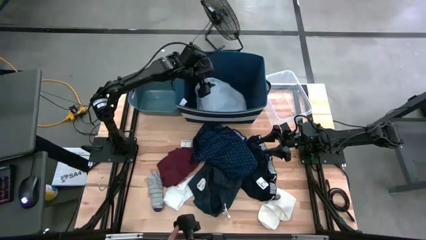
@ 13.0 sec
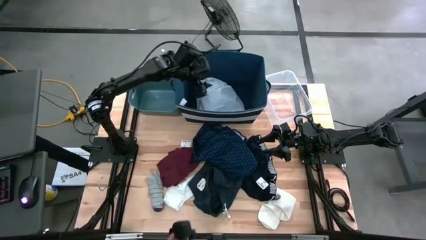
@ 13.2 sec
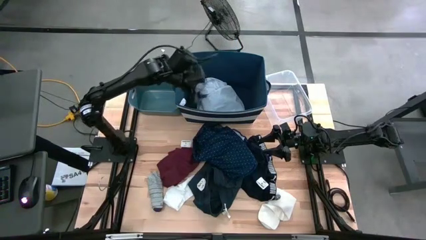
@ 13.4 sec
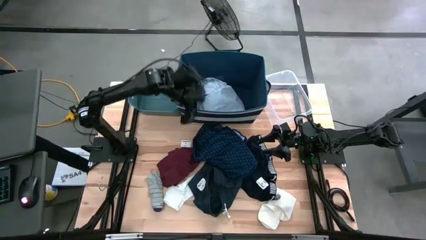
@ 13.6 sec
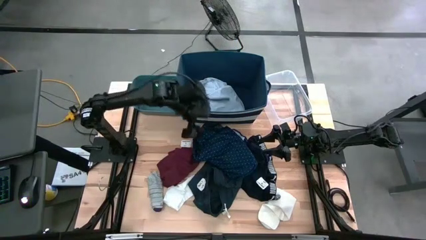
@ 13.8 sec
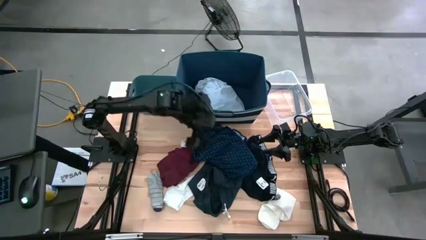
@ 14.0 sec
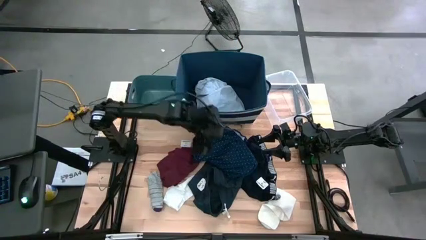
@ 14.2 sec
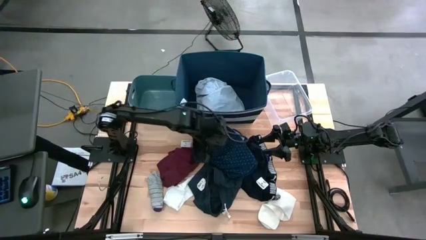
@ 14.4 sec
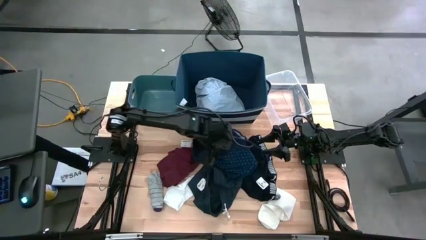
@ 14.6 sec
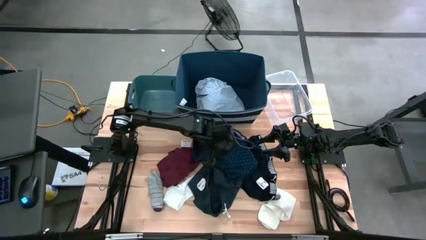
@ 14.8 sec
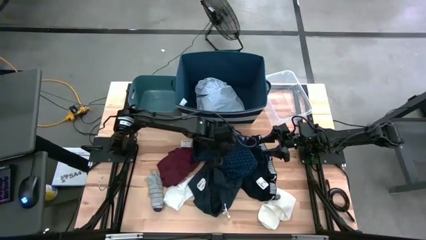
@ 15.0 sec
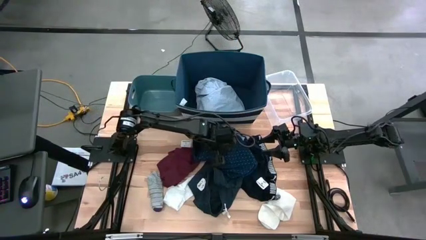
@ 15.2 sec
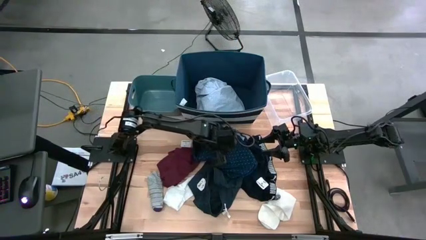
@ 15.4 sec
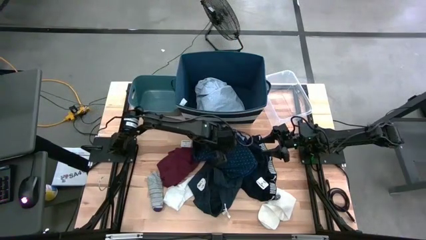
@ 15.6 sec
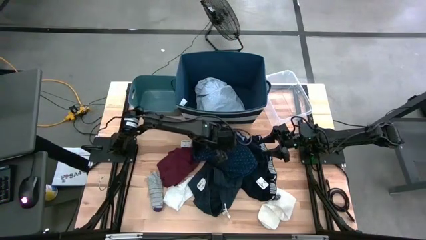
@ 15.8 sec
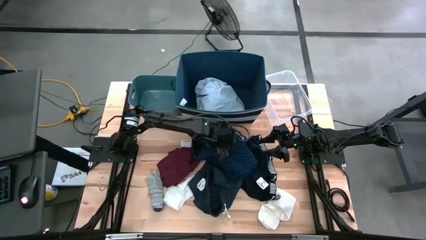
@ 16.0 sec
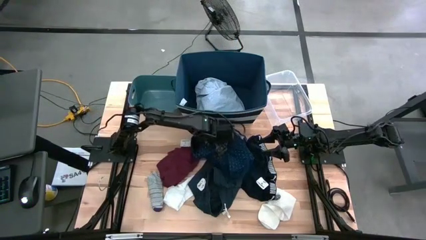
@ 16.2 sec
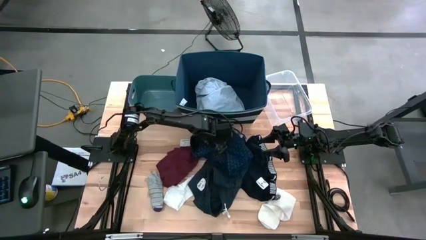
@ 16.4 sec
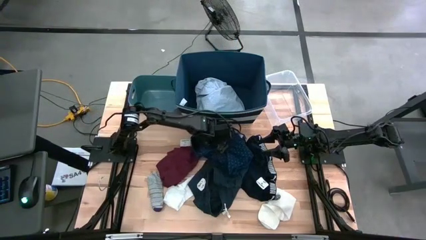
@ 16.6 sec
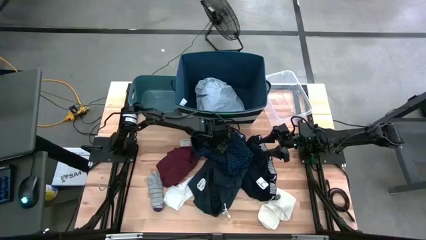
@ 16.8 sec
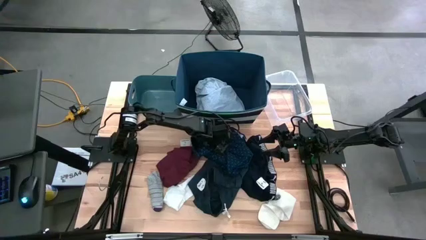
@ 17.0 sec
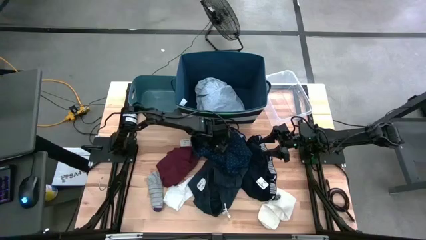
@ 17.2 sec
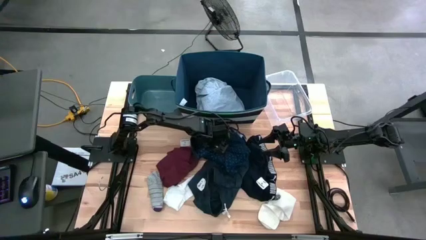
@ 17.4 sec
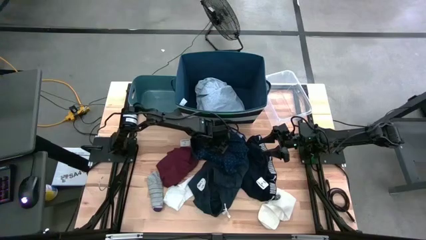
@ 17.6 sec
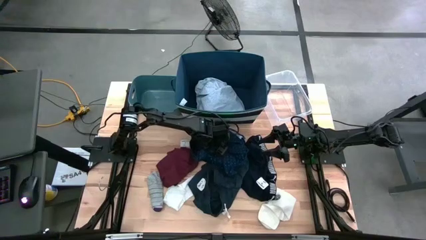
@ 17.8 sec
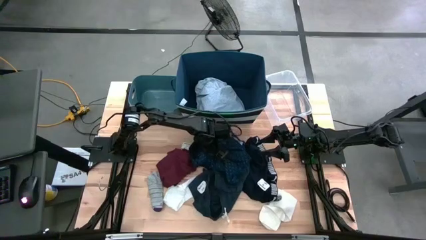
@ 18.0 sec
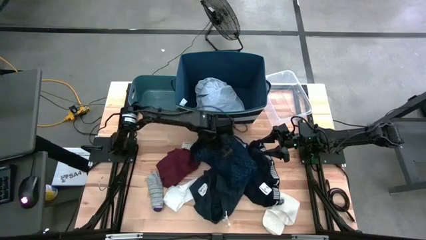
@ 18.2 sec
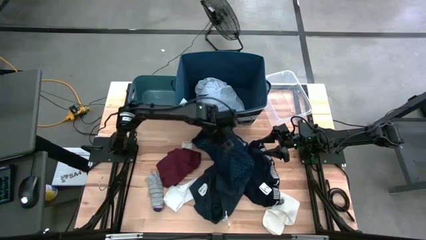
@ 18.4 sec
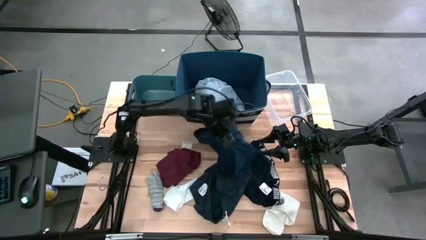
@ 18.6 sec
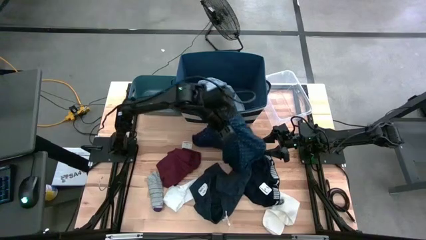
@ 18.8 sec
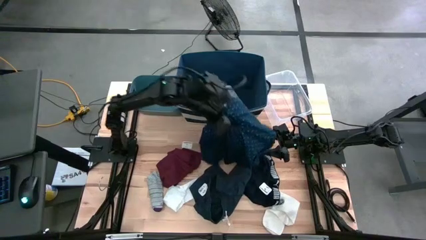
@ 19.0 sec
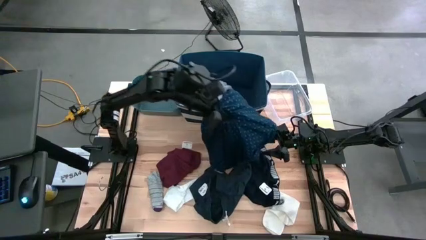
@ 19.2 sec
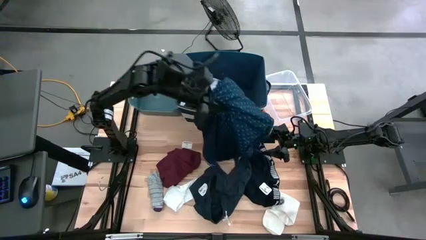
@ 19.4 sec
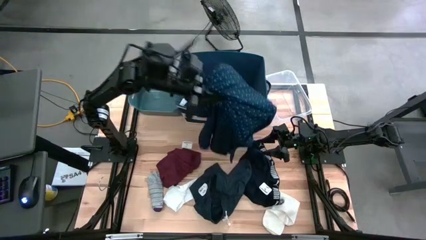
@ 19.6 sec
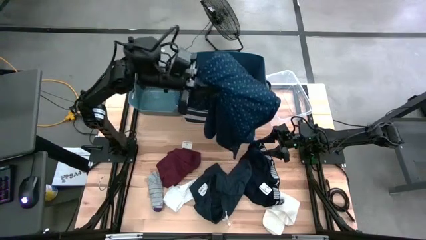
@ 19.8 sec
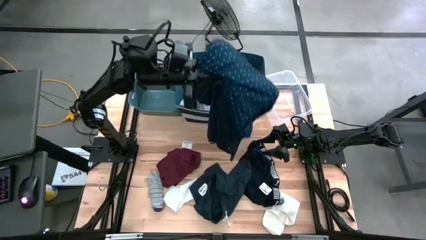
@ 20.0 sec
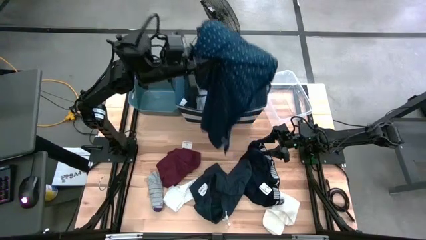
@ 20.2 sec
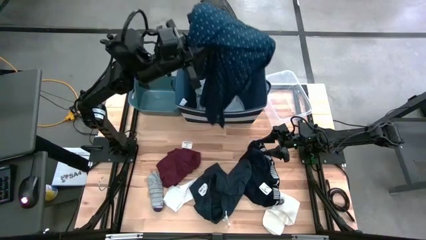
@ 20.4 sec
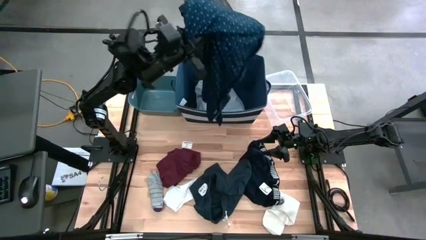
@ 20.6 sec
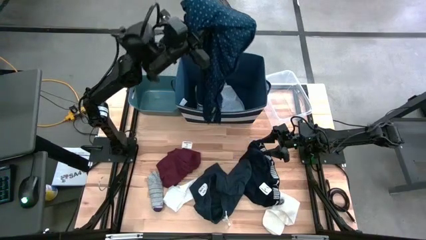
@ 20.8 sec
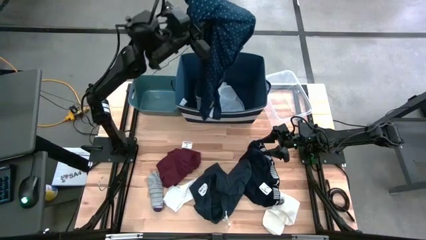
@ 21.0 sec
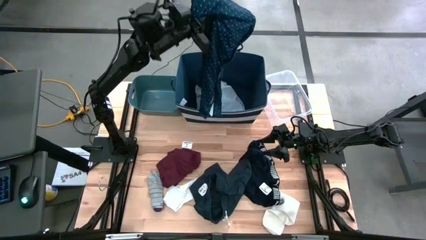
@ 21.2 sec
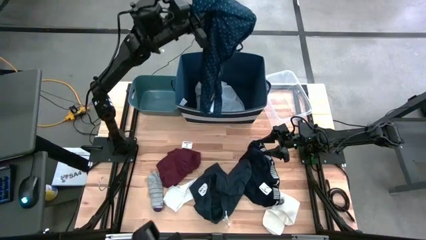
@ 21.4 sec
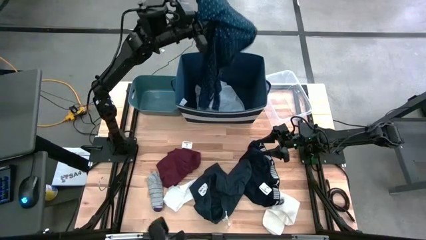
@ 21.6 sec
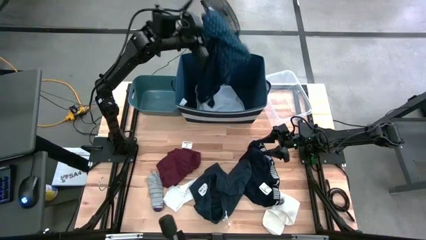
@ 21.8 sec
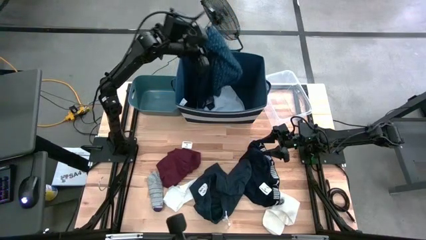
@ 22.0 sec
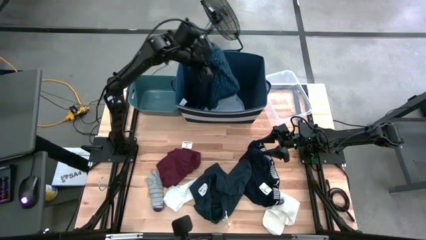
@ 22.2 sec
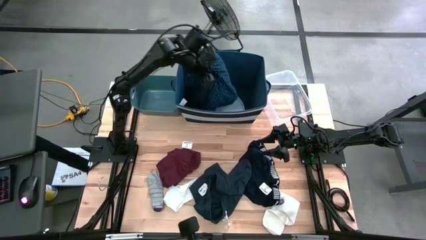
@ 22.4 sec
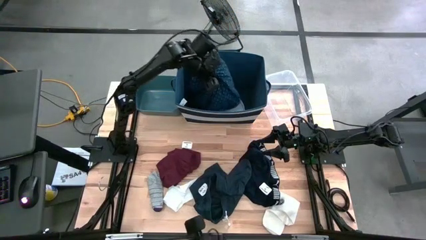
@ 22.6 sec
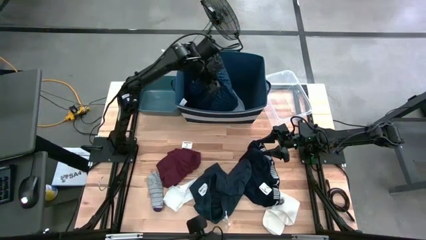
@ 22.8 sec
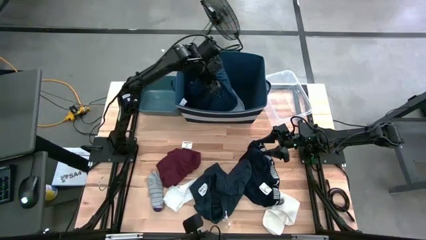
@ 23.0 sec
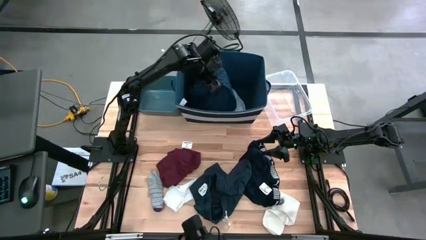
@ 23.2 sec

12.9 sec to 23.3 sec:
Task: Pick & Place Cloths
Put the blue shirt into the blue bin
